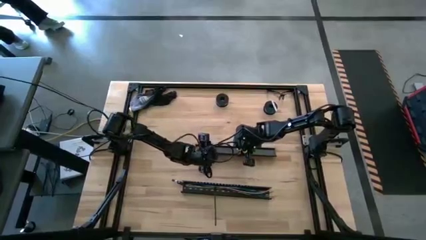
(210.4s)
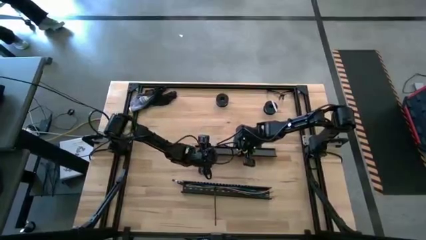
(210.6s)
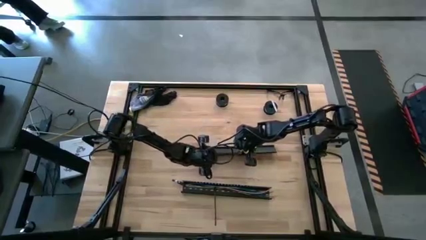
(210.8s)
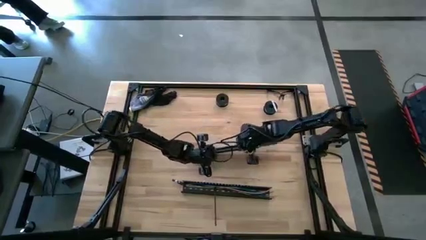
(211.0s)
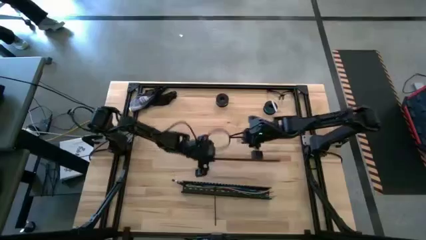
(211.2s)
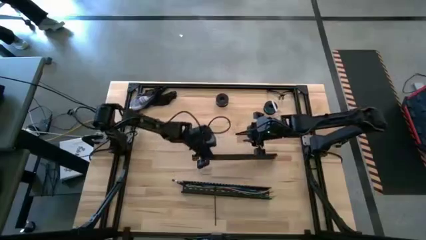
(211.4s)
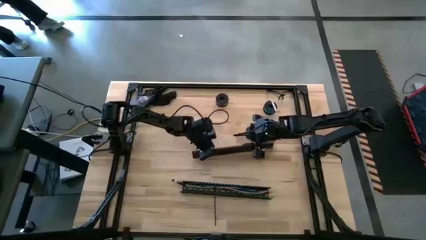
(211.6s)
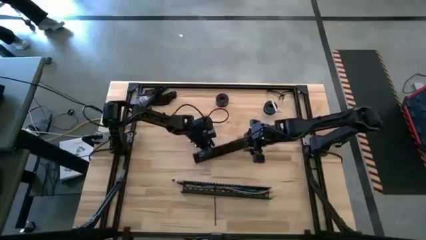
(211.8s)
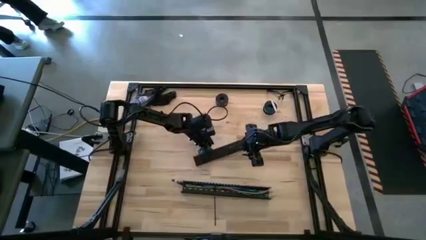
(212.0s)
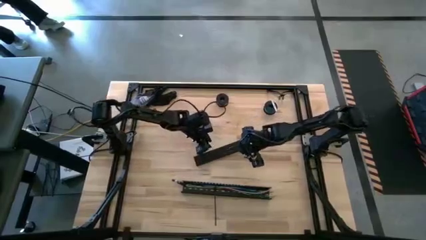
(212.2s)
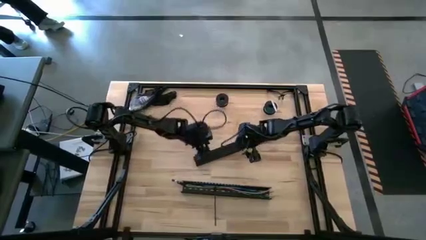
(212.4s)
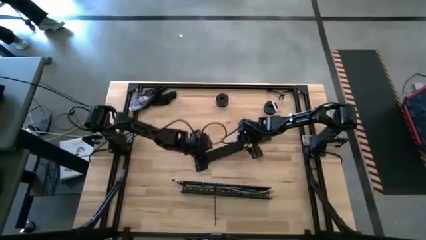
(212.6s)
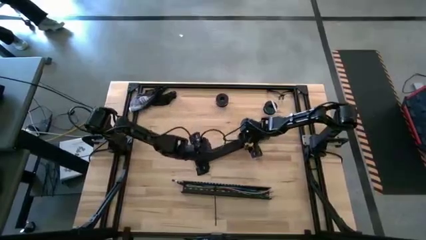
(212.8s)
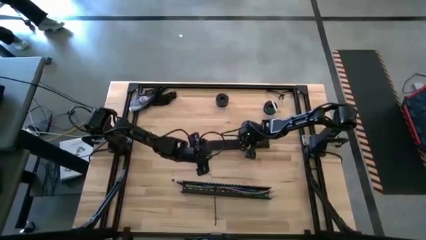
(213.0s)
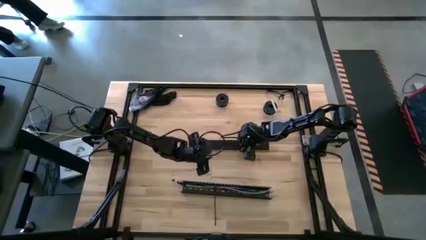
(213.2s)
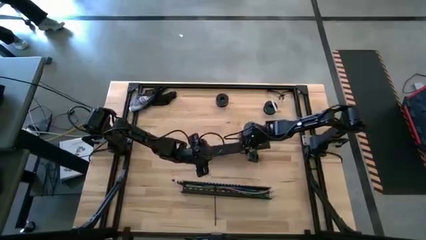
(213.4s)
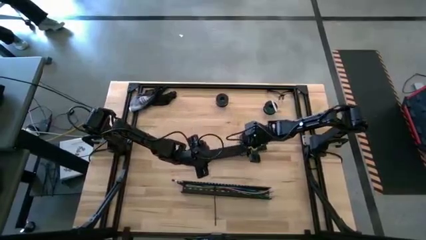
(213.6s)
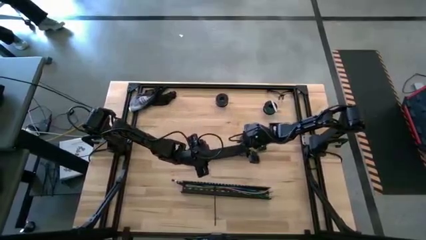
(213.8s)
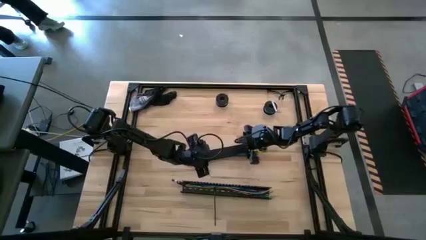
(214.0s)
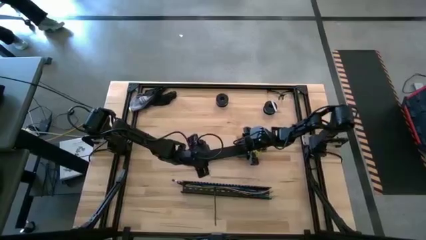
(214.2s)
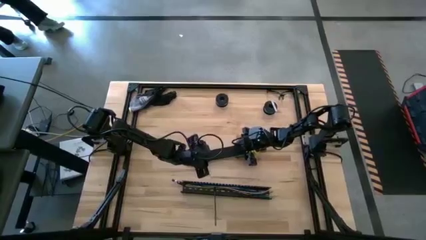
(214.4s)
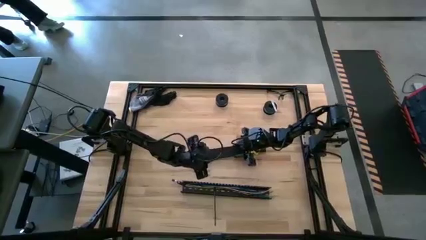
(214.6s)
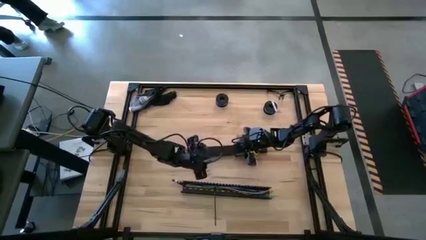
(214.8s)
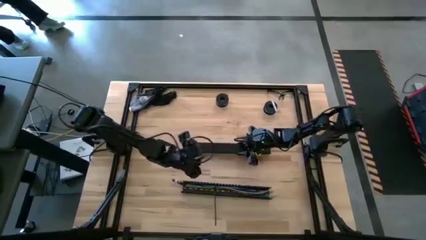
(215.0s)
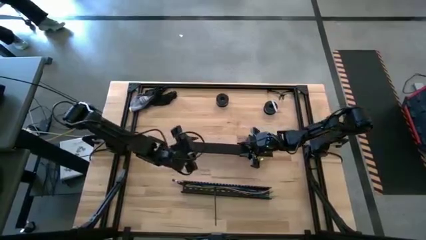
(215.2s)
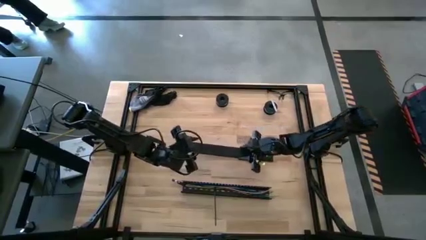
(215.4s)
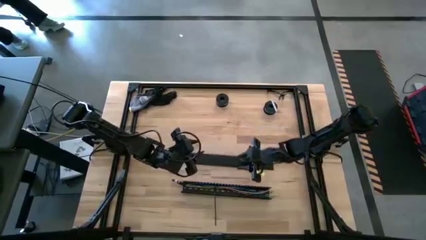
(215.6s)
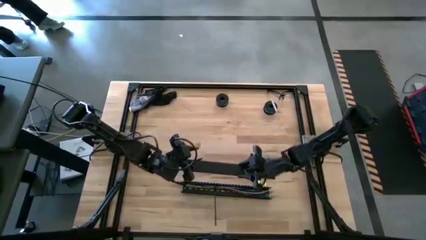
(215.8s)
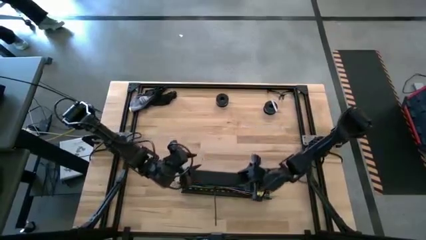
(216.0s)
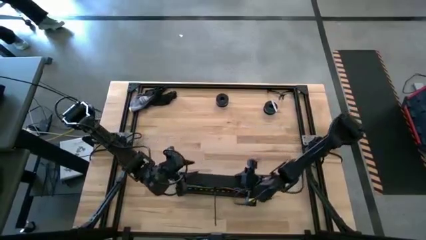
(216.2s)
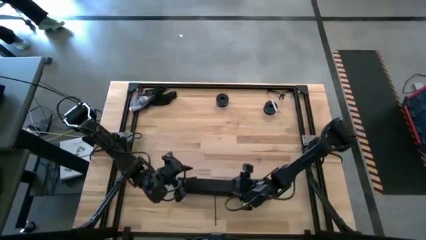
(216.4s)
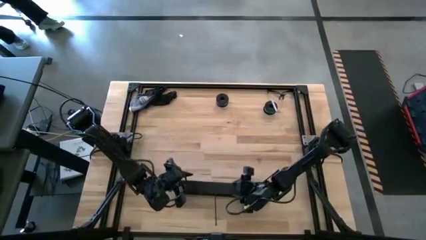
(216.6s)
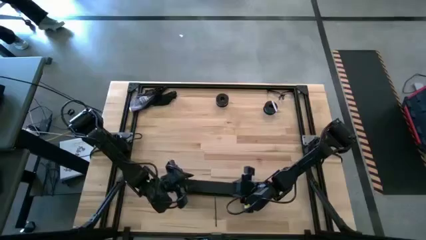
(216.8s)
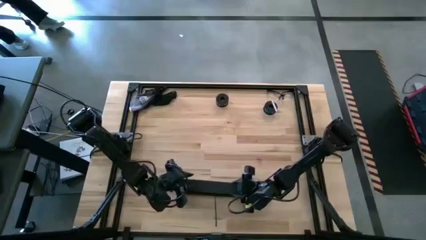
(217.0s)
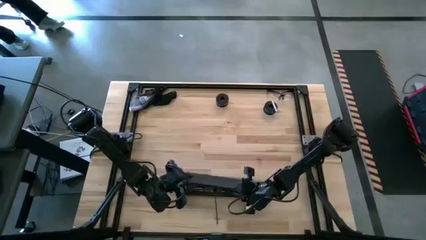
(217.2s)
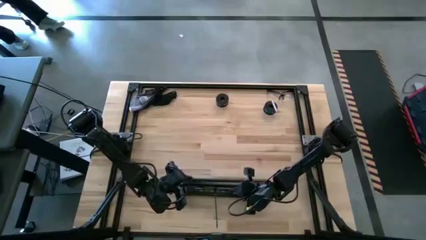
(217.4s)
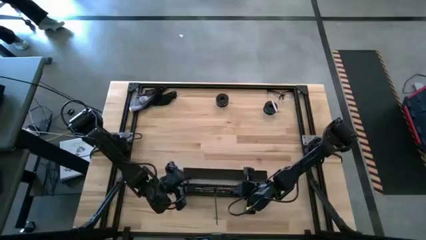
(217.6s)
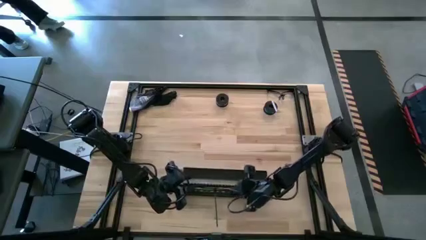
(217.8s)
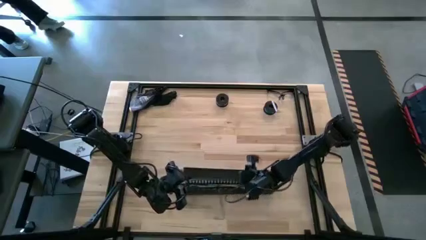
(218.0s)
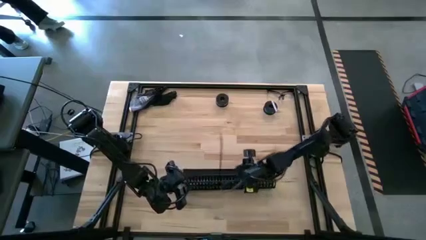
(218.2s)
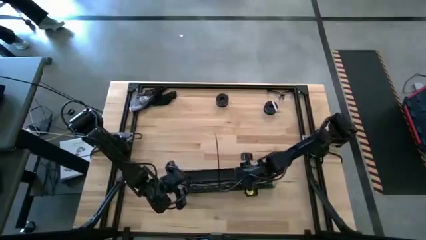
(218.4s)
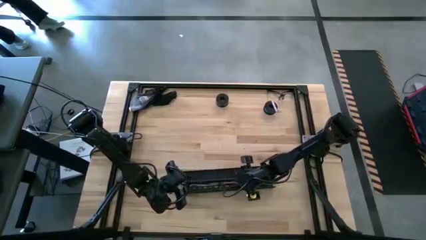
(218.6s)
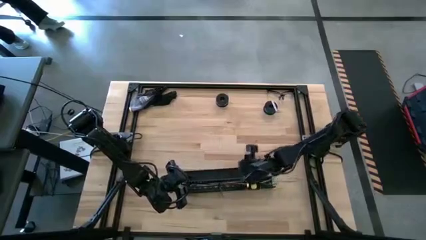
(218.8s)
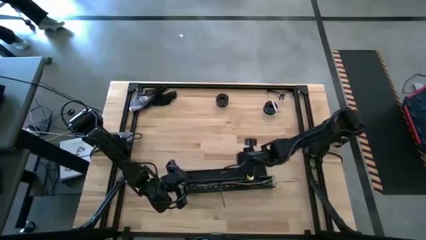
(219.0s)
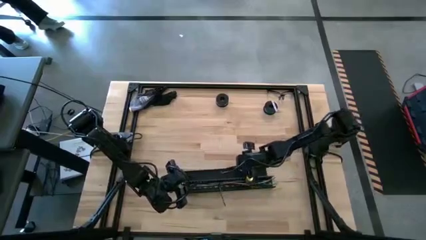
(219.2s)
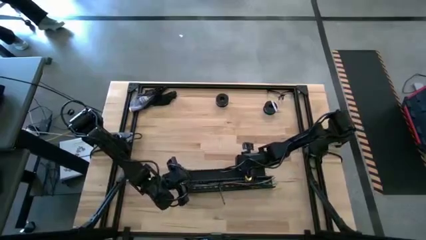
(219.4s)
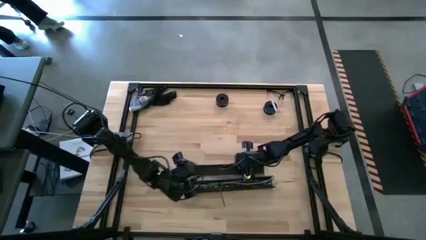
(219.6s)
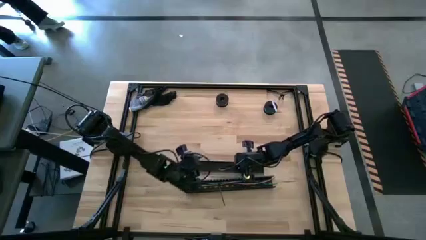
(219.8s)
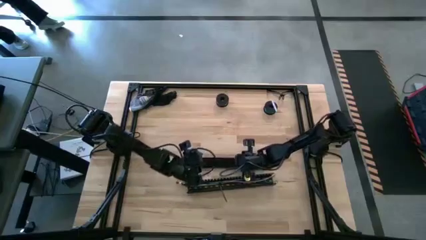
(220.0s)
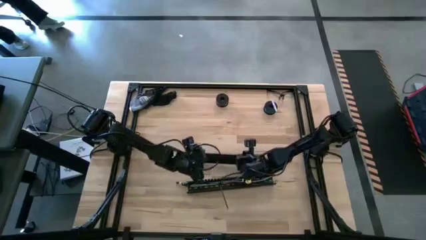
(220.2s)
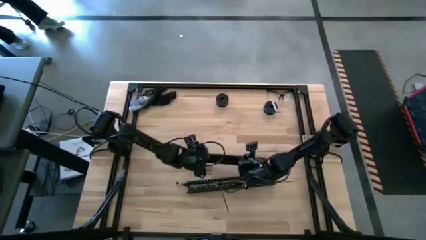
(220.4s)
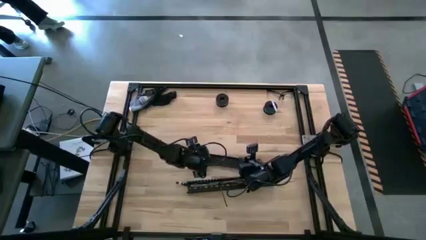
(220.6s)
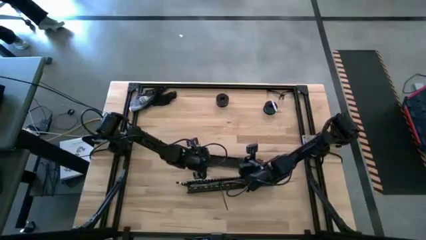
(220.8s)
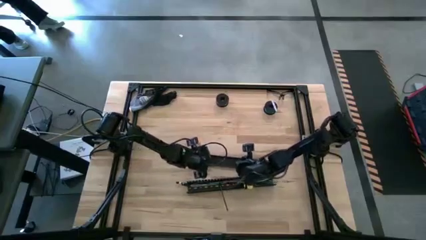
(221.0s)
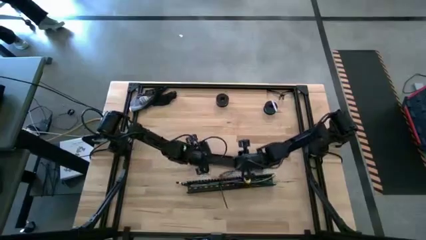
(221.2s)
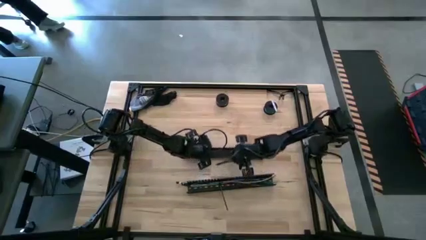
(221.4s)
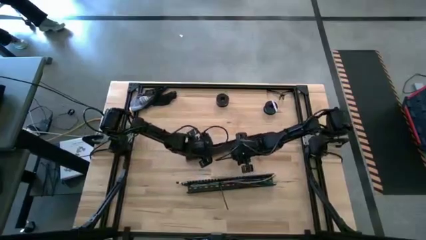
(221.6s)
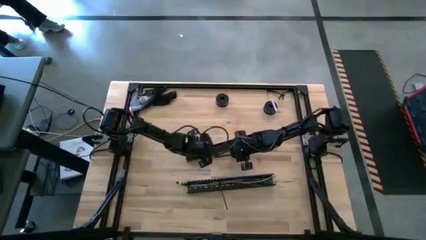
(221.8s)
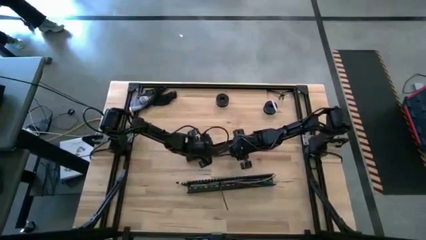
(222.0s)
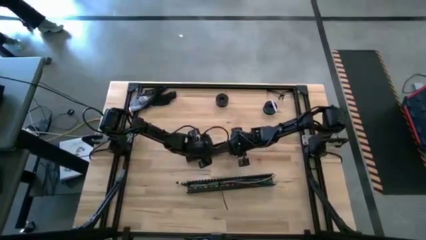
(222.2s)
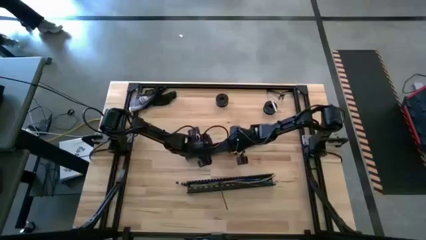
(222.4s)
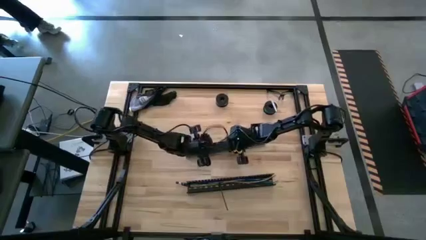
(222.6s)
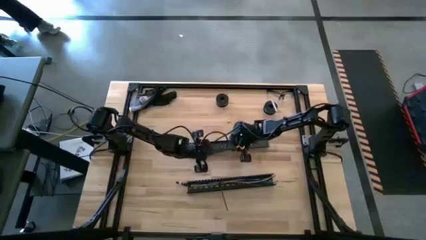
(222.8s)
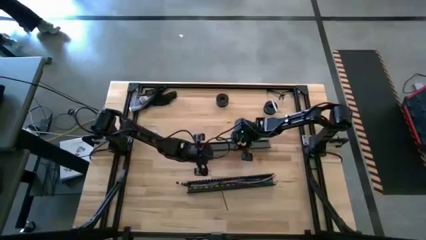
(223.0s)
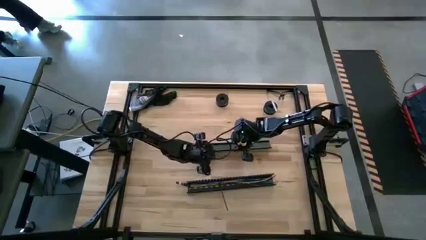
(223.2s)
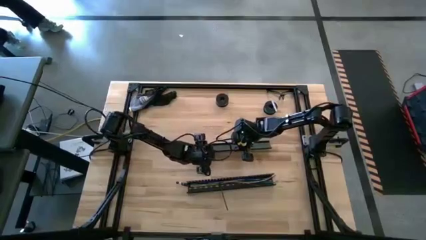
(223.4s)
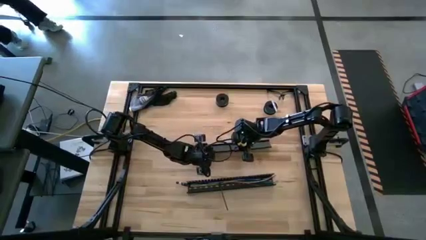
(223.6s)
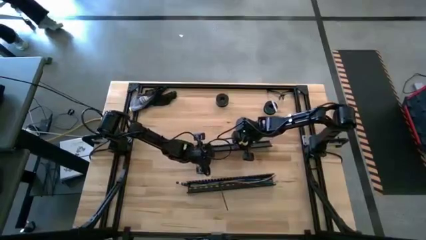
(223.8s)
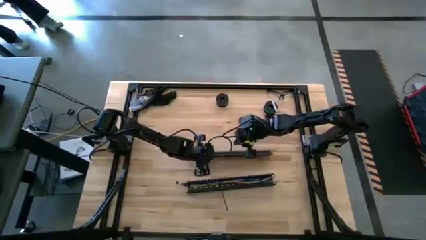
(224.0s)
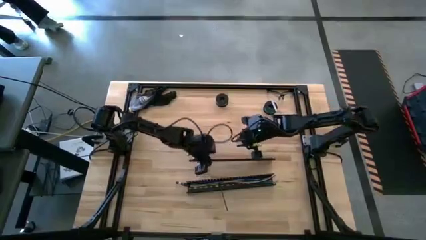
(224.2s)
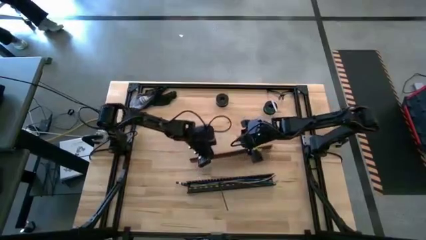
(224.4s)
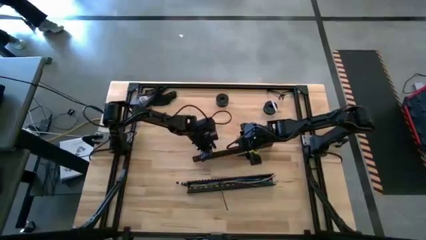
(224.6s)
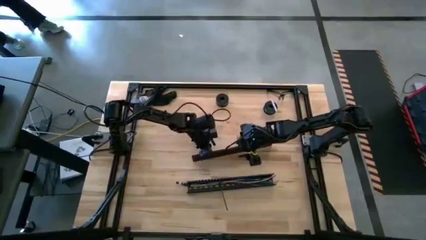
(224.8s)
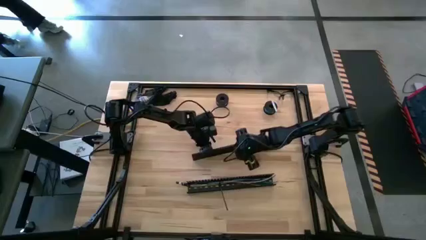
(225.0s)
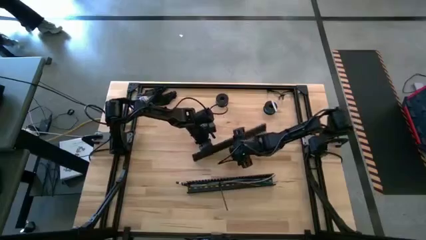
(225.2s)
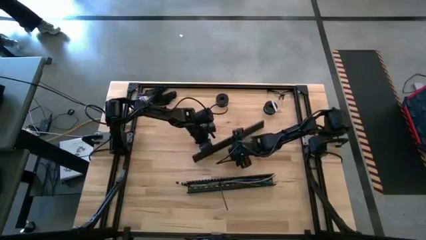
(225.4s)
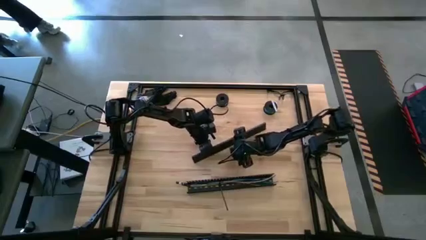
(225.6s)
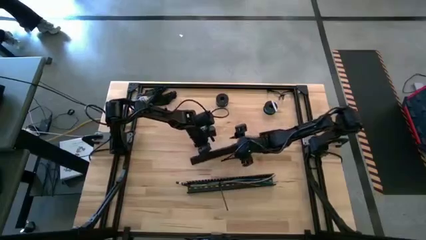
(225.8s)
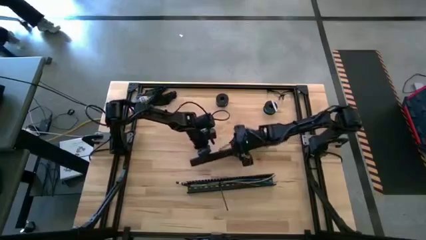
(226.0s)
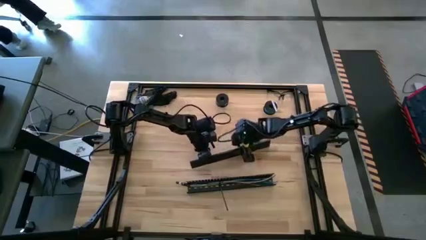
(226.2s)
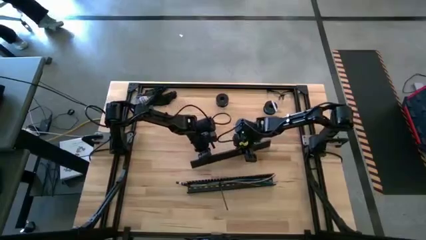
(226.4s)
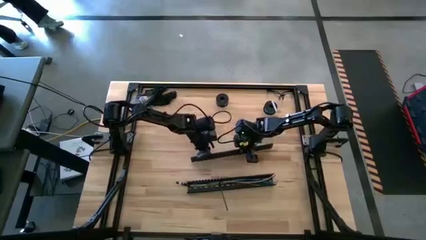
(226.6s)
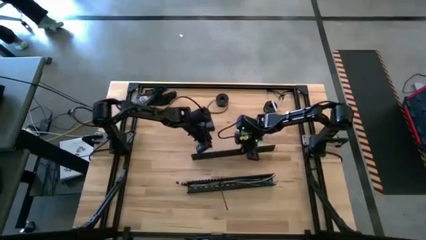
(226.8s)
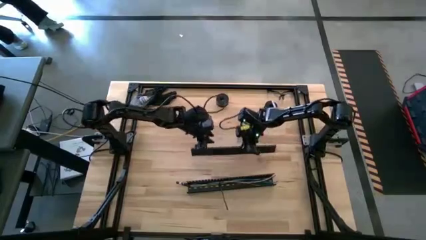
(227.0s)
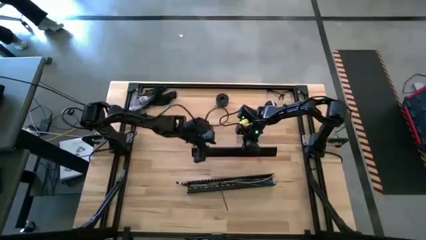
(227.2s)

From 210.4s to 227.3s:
Task: Ziptie cables
Close the black cable duct
